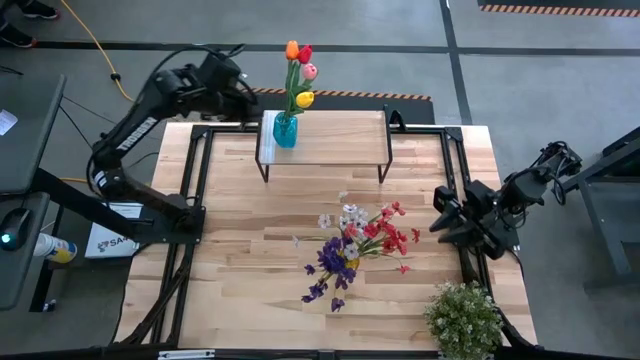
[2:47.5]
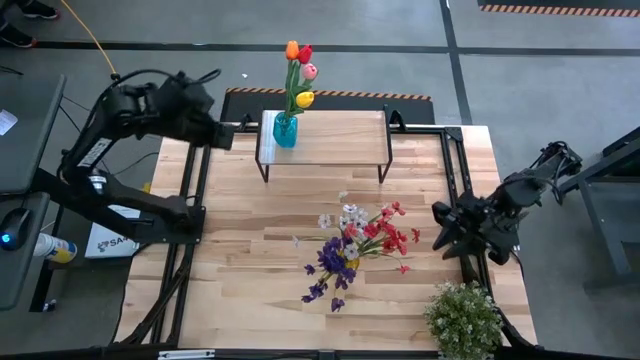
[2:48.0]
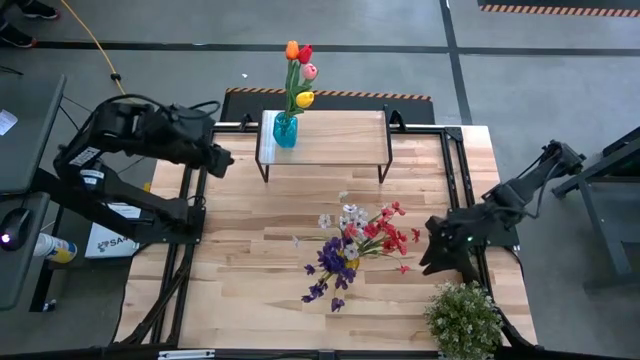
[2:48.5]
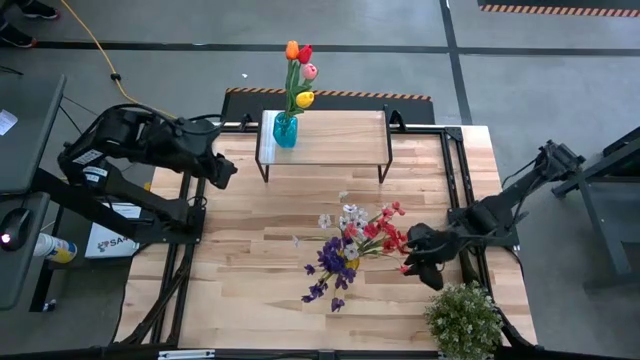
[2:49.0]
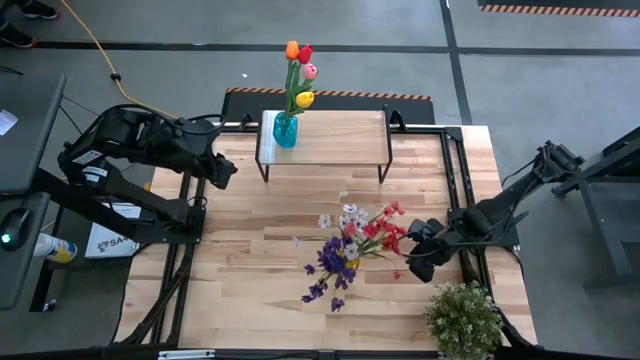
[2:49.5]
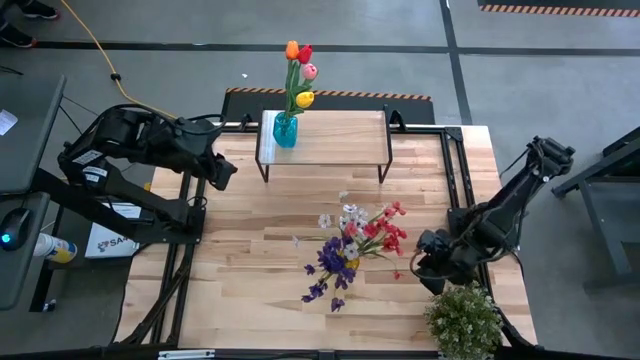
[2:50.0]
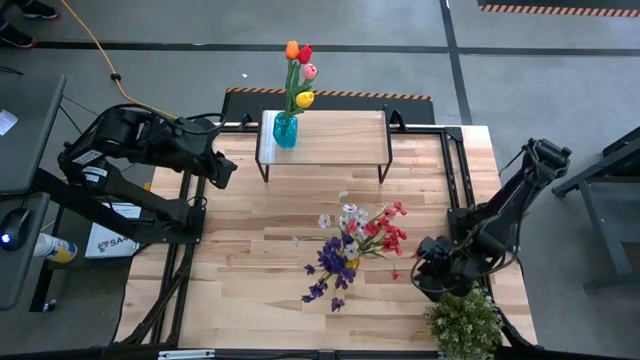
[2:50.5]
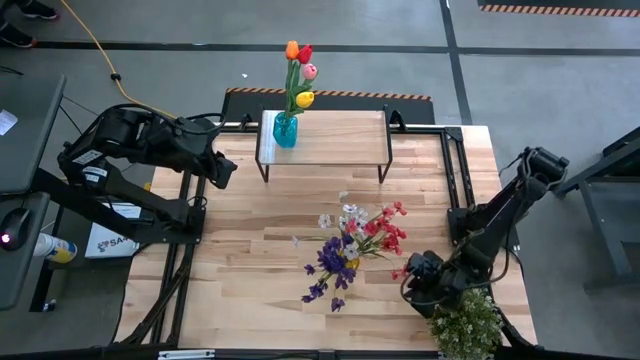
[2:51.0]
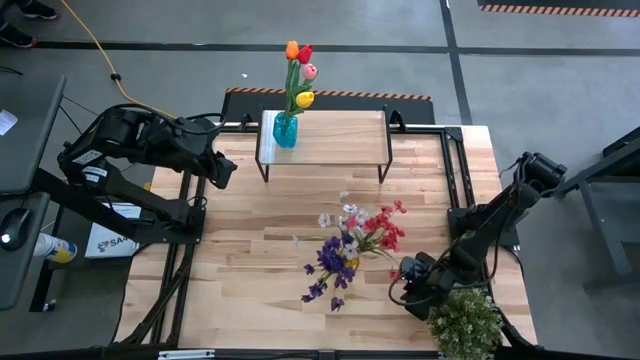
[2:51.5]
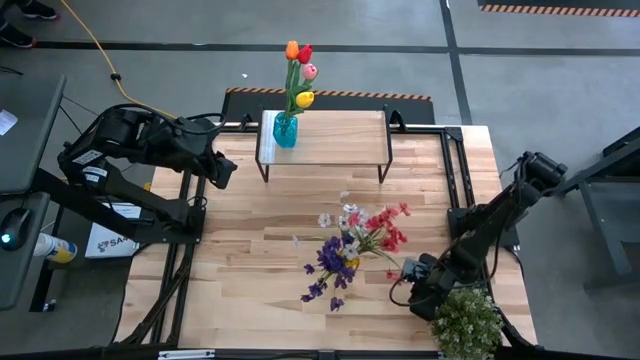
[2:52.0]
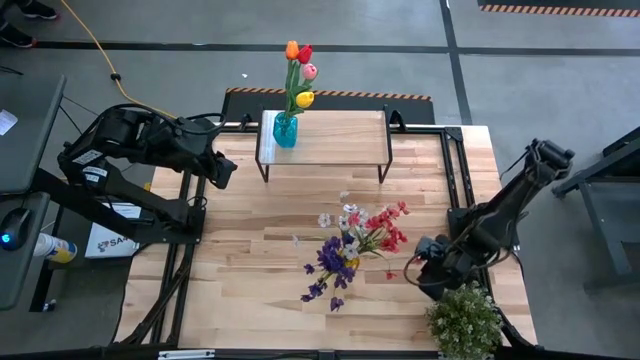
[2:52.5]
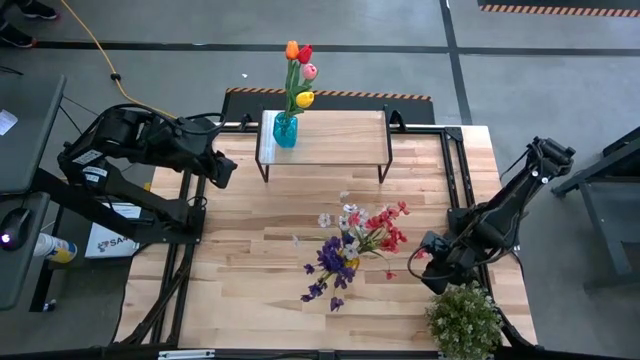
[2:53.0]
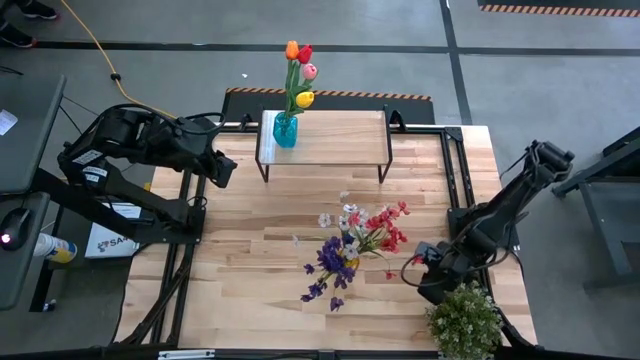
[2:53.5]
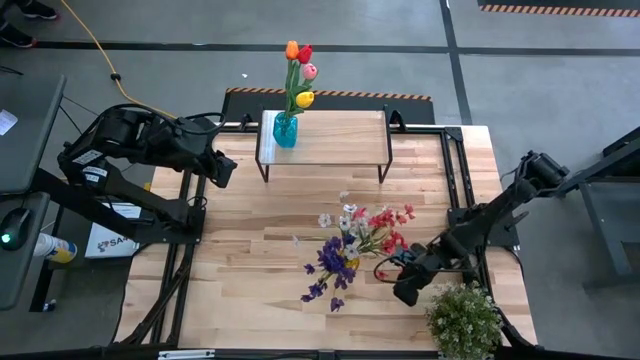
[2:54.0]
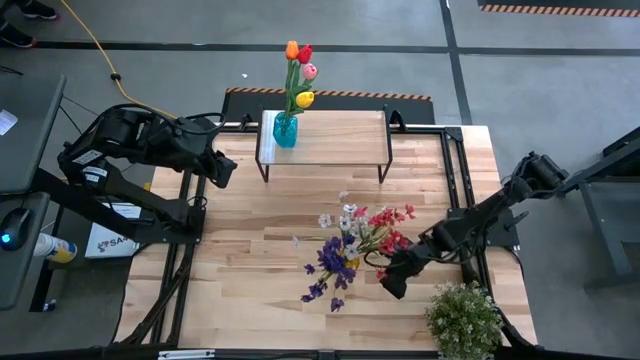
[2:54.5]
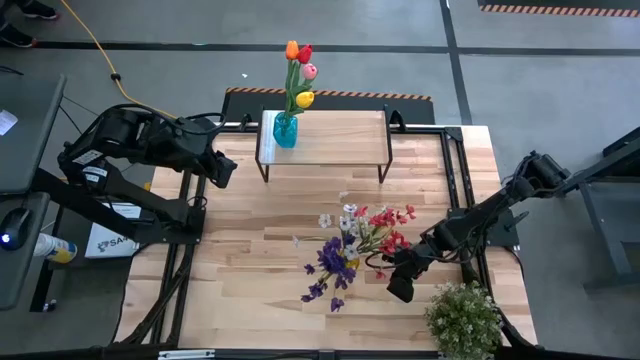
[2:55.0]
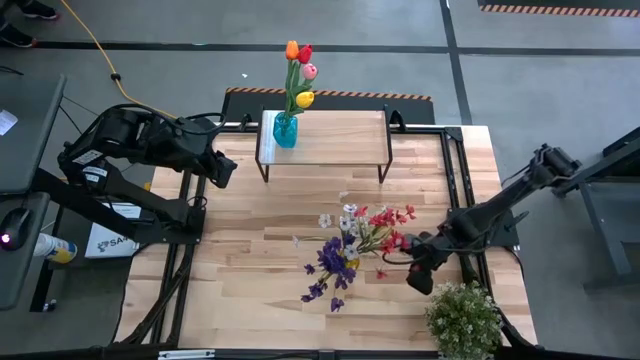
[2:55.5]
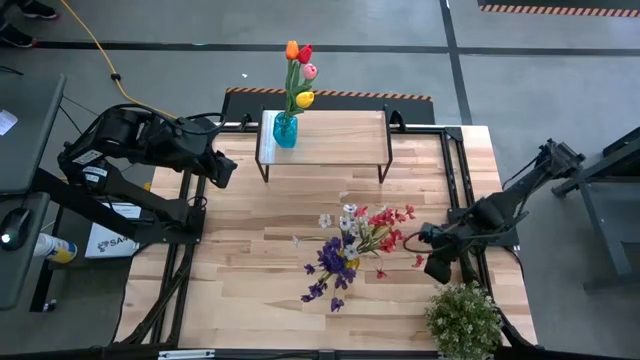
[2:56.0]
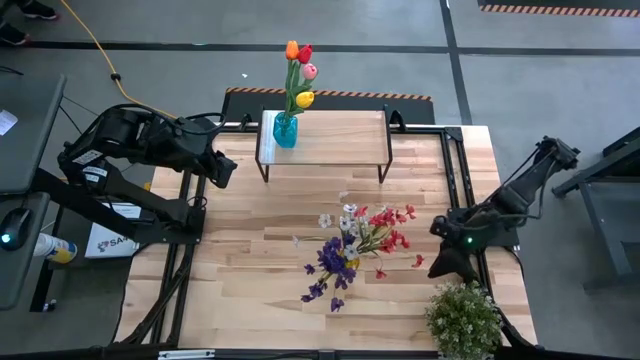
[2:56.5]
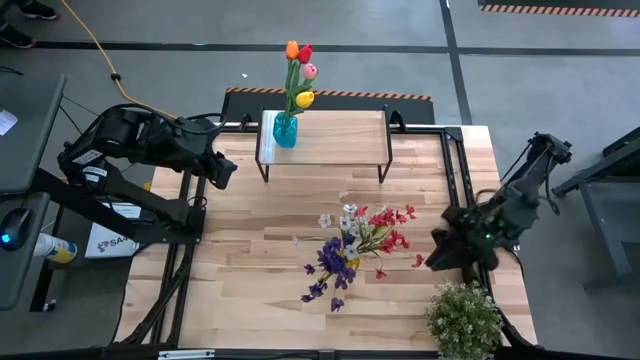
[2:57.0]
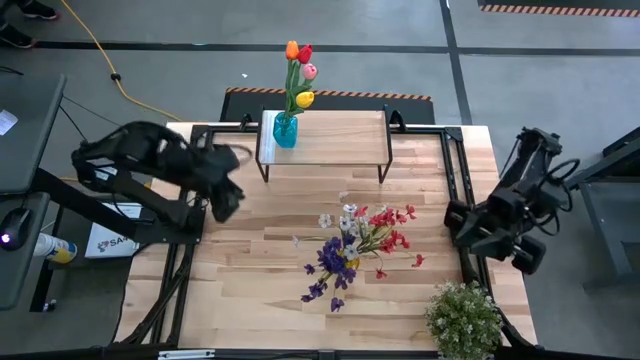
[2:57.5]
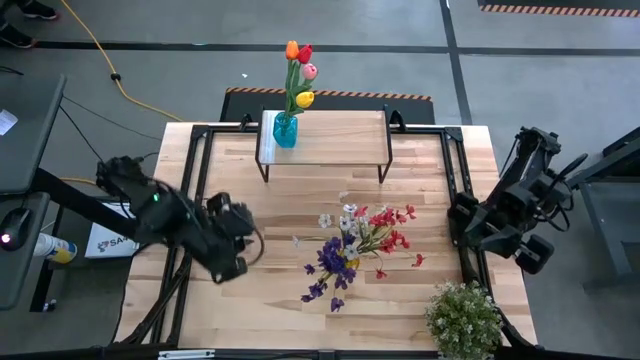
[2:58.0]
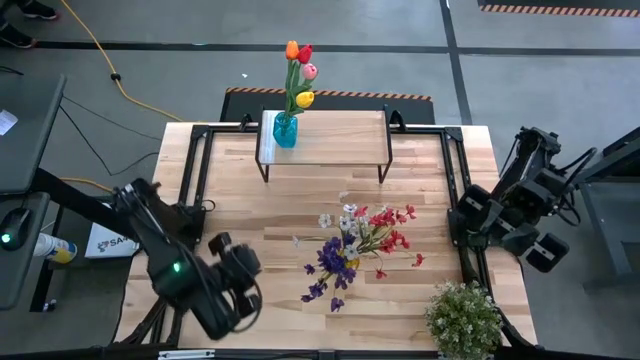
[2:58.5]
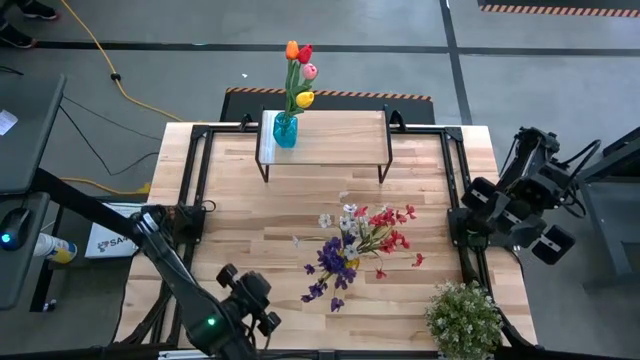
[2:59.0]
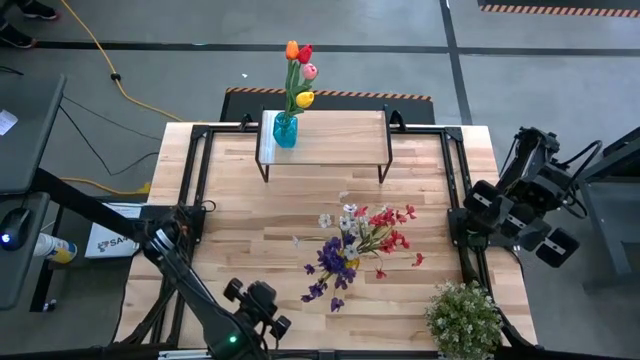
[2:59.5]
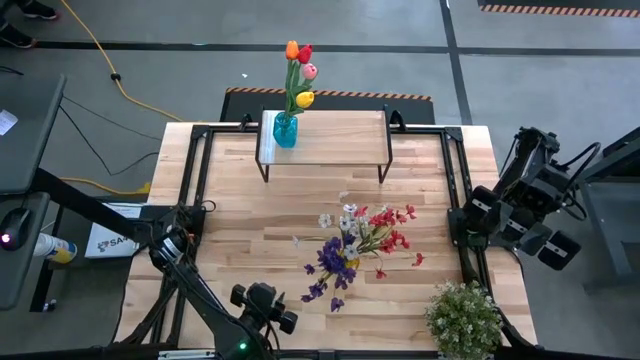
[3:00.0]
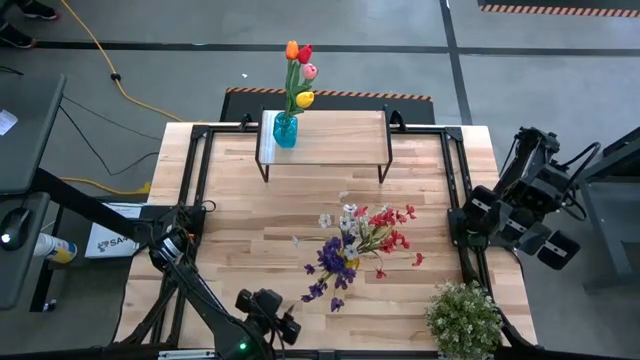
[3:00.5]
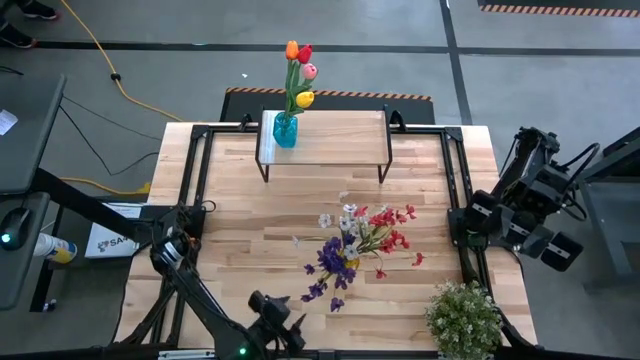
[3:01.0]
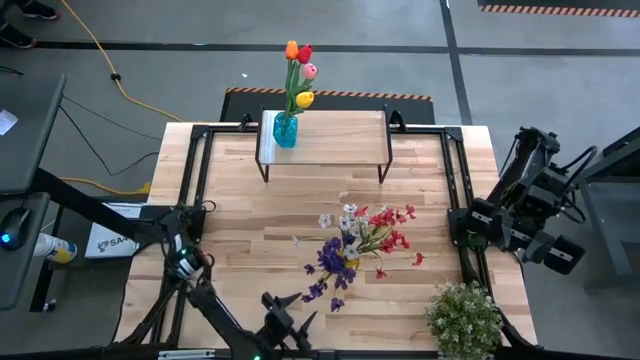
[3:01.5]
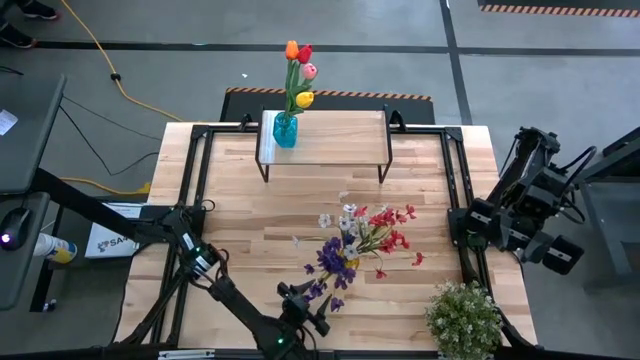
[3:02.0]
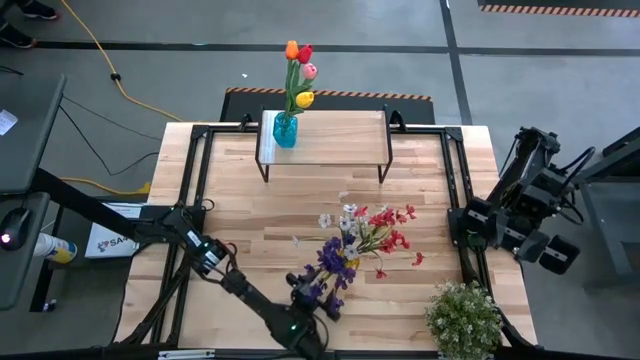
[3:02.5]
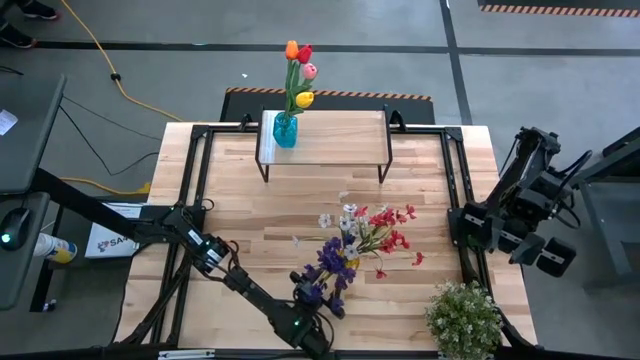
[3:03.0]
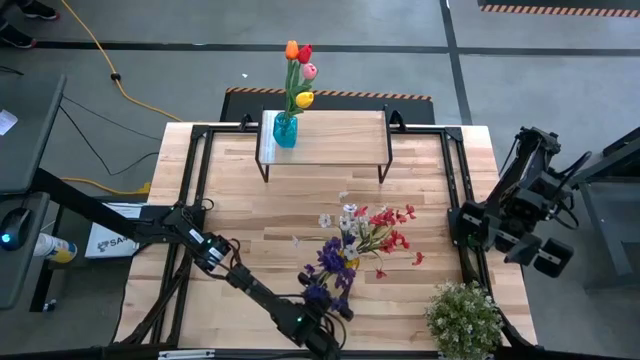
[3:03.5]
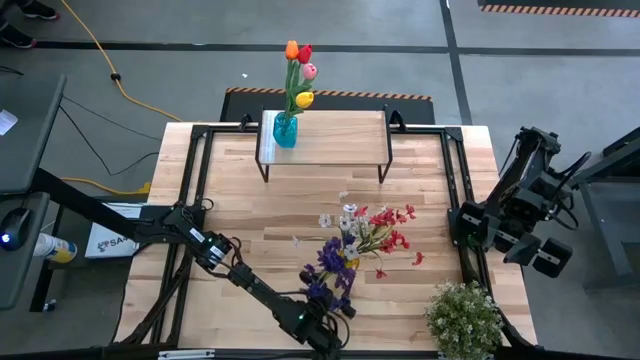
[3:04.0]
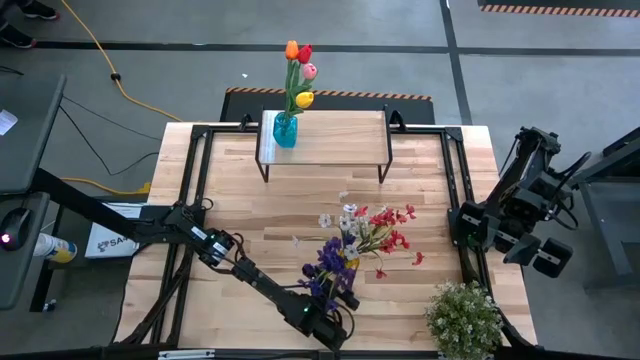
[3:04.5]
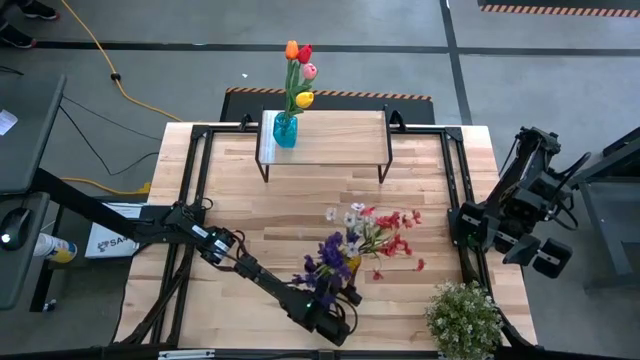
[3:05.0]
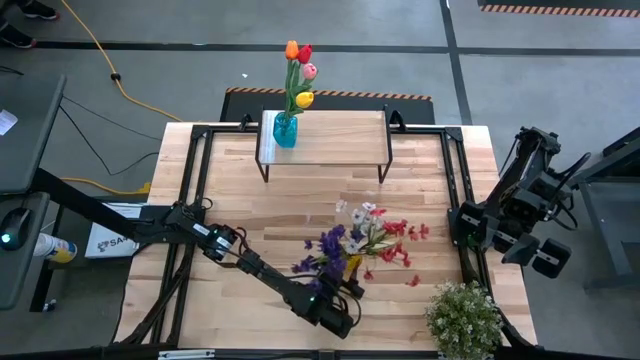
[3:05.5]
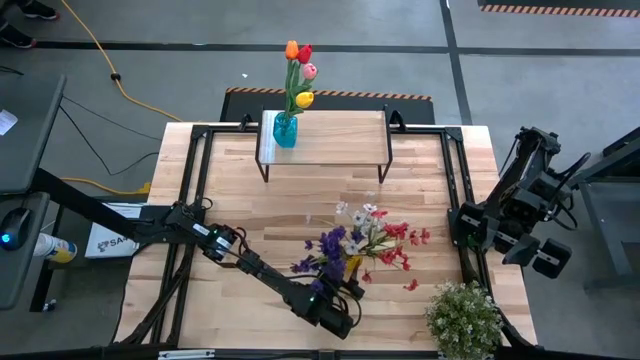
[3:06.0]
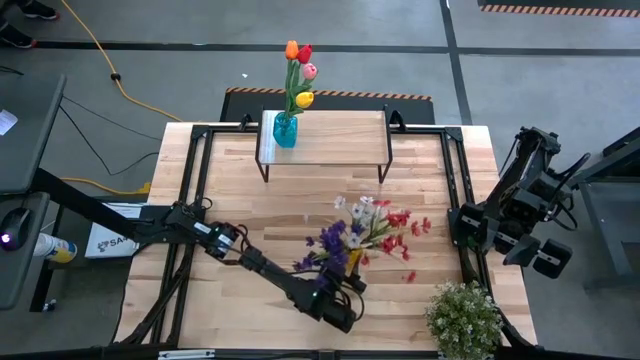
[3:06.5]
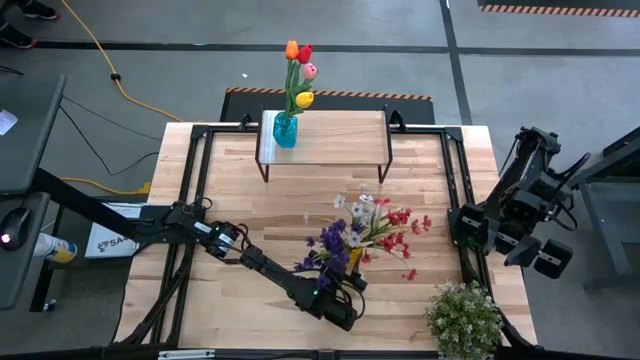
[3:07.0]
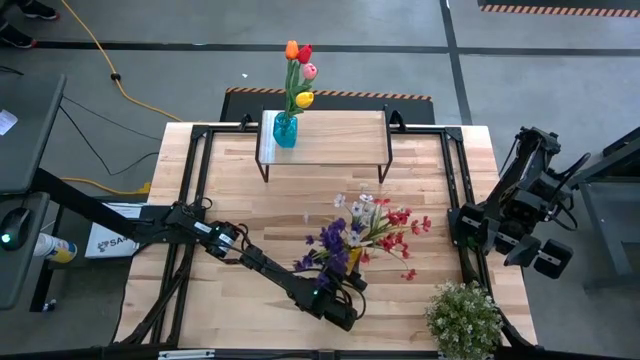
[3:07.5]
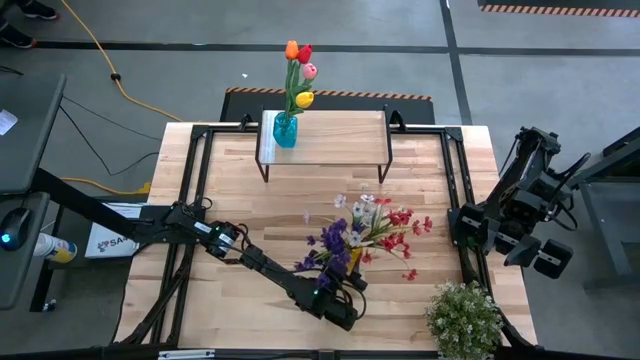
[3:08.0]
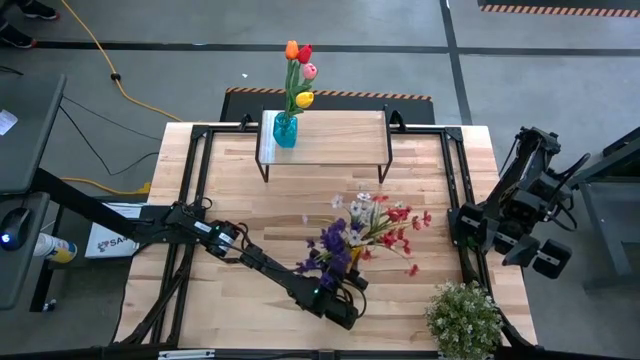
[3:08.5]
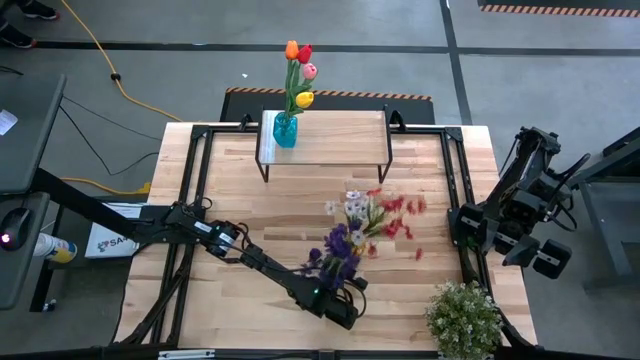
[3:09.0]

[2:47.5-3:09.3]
Task: Pick and place flowers into a vace then onto a shelf
Put the yellow flower vase on the shelf
